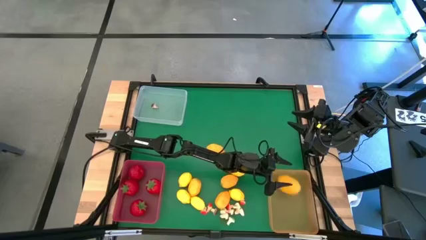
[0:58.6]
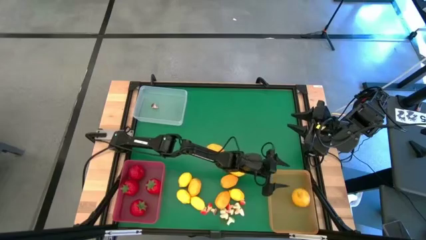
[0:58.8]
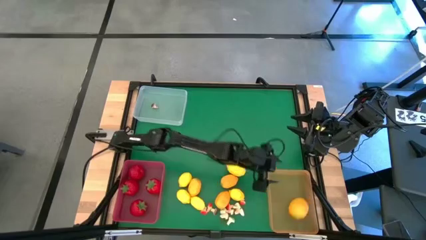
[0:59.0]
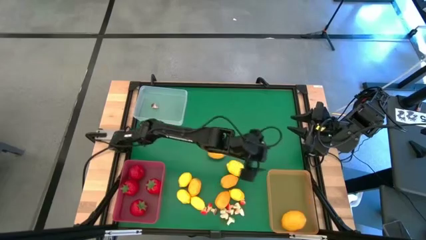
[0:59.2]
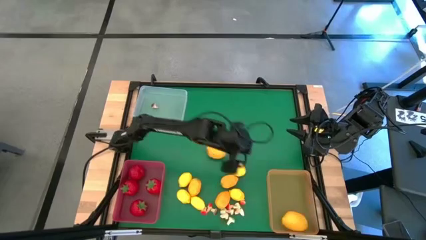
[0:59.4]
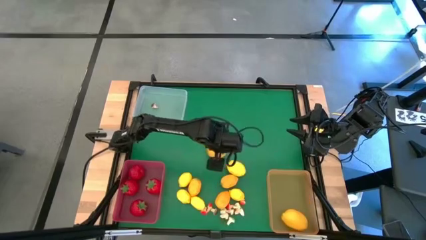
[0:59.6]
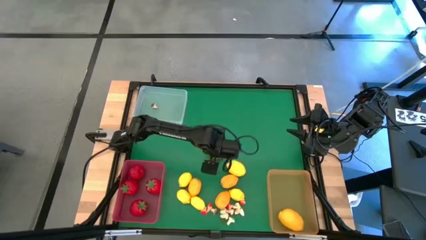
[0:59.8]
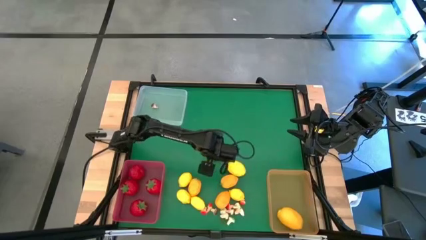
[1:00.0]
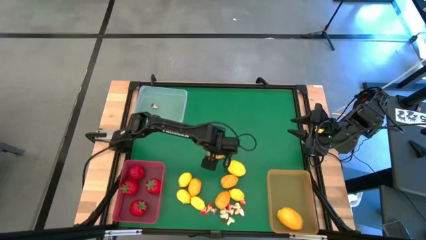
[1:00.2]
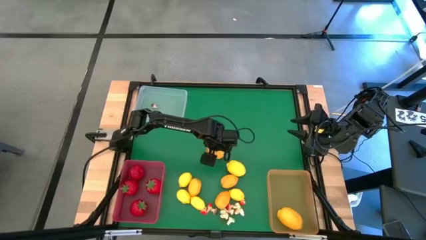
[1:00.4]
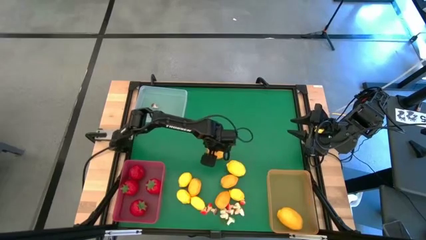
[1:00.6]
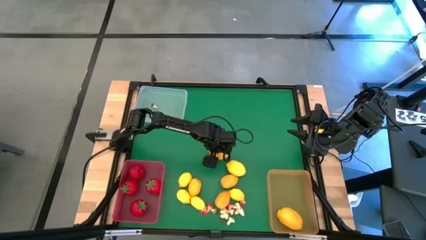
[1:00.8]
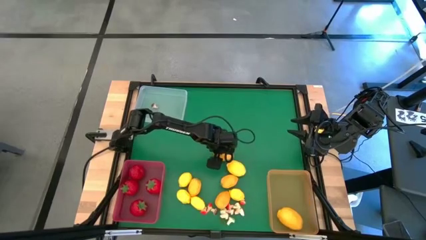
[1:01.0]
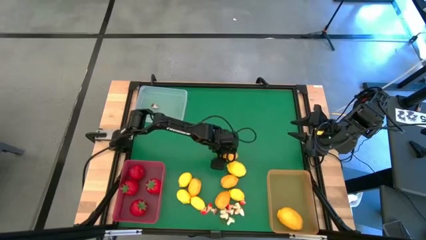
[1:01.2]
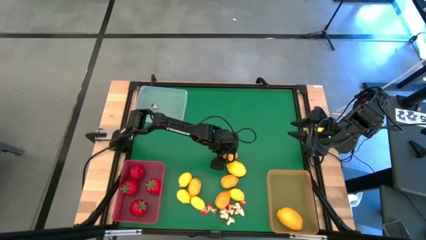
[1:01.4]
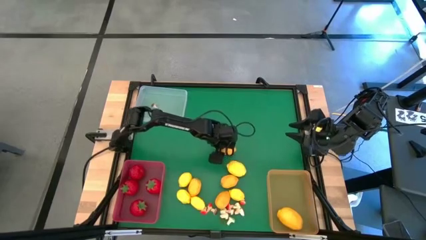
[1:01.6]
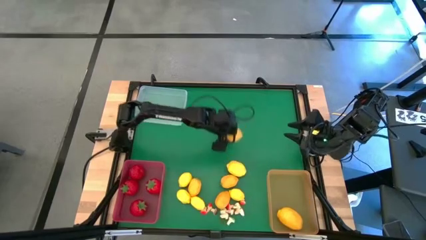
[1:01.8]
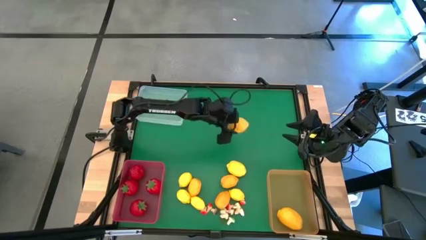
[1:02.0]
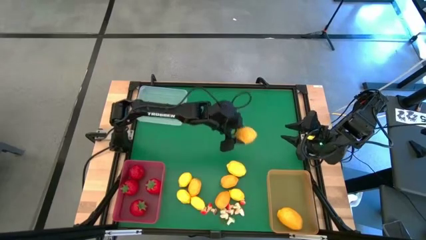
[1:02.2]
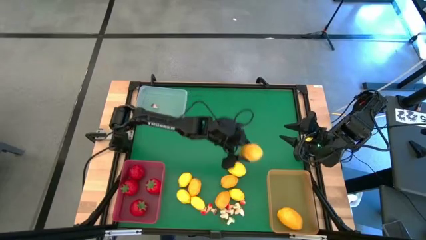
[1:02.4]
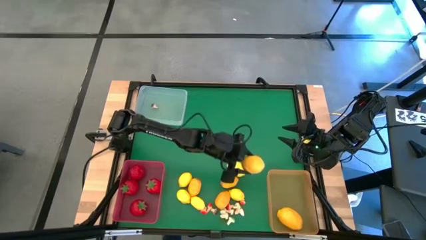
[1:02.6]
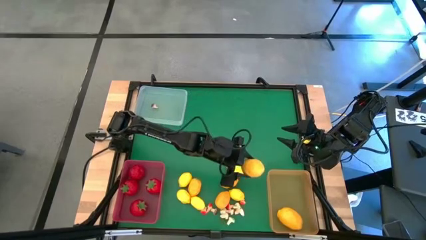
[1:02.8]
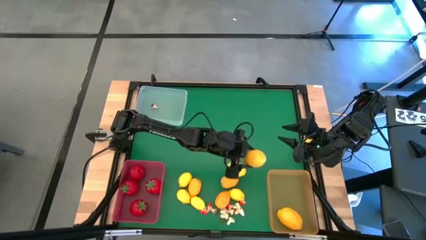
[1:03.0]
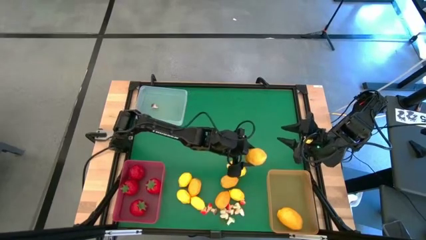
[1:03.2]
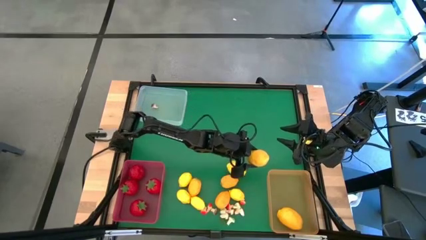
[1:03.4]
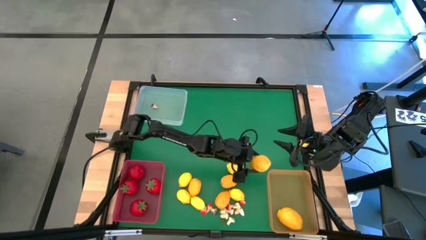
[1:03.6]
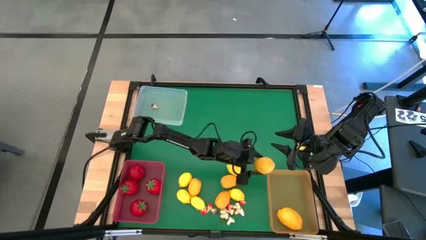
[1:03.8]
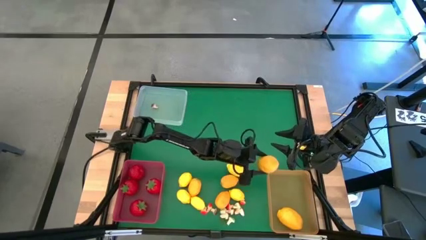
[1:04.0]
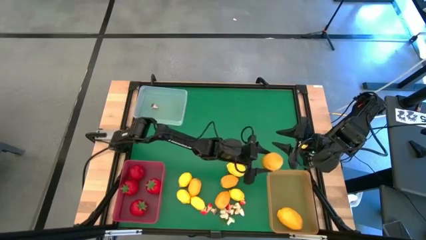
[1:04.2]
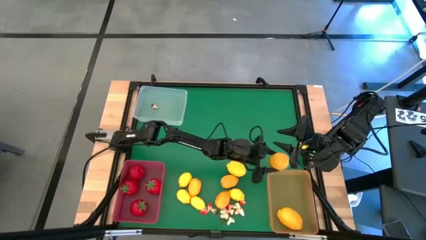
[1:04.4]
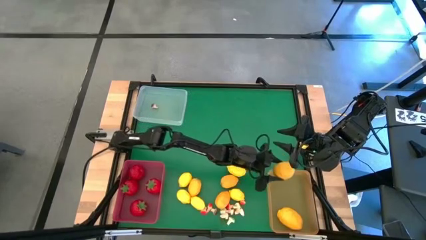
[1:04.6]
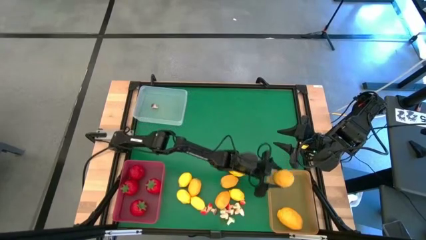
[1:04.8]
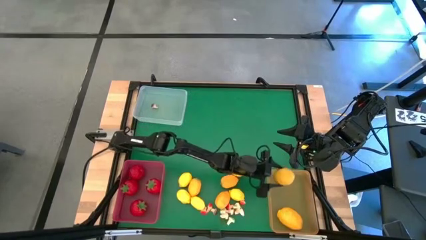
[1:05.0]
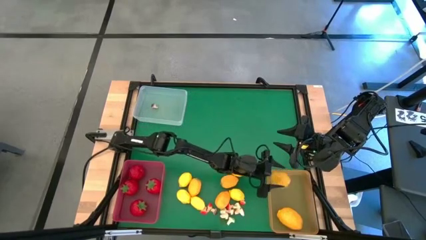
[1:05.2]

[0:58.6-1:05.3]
Task: Sort produce into baskets
Put the yellow lemon into the orange bin

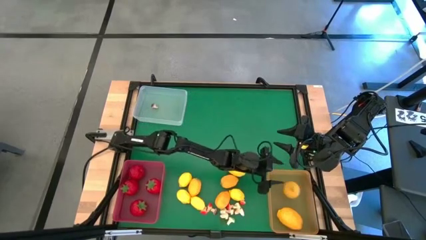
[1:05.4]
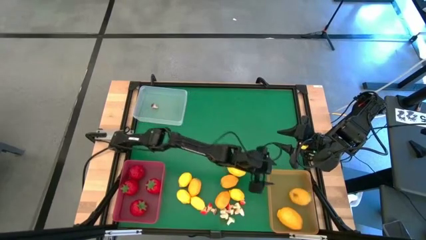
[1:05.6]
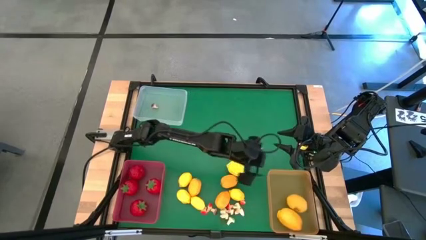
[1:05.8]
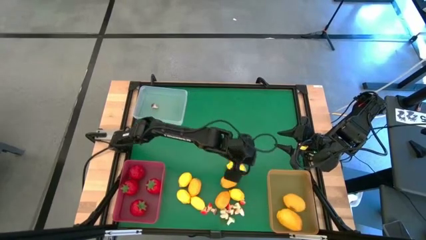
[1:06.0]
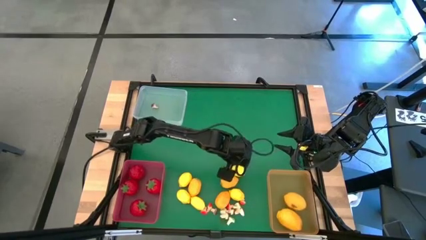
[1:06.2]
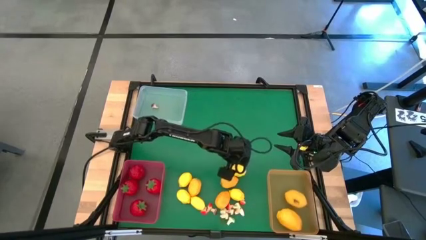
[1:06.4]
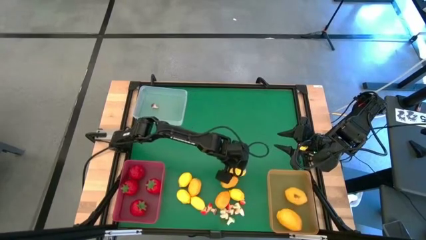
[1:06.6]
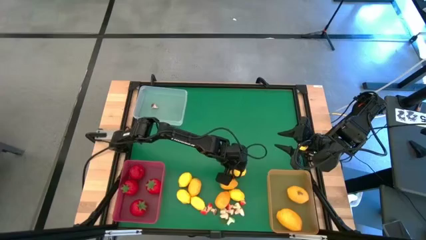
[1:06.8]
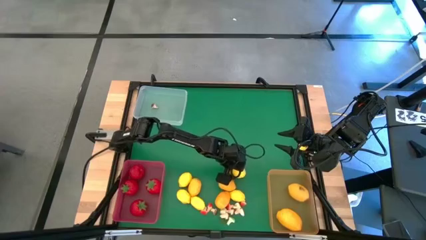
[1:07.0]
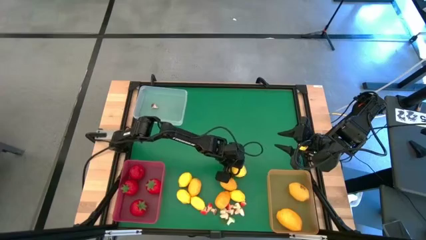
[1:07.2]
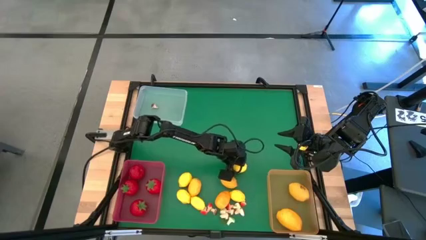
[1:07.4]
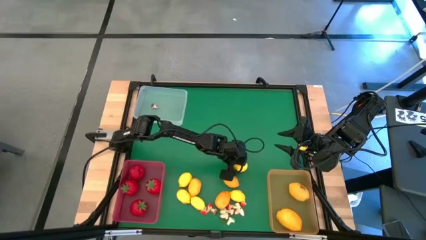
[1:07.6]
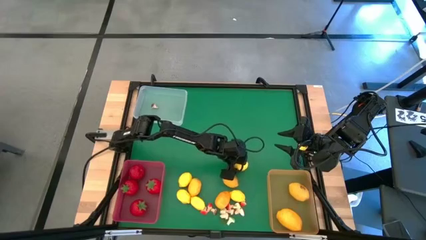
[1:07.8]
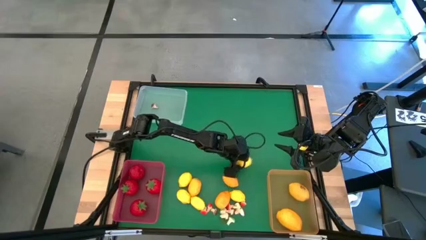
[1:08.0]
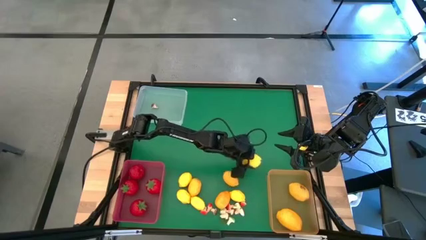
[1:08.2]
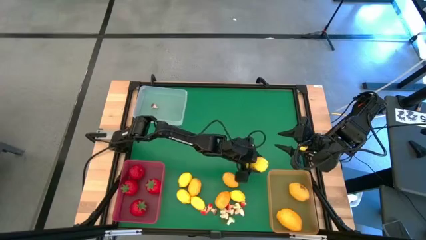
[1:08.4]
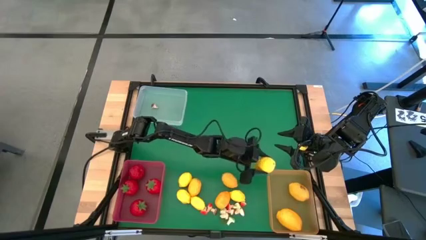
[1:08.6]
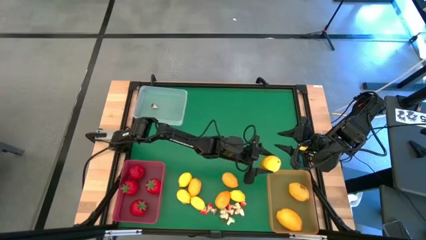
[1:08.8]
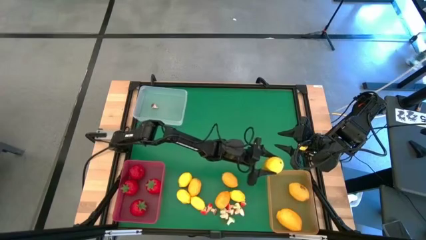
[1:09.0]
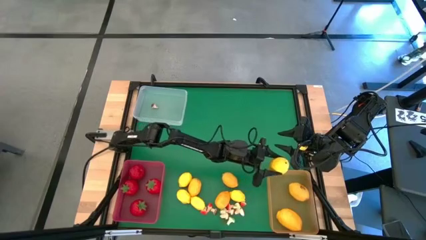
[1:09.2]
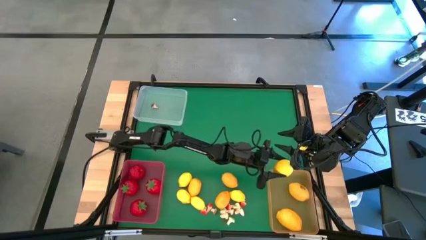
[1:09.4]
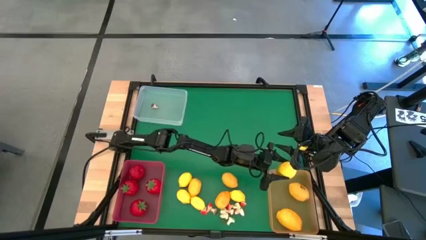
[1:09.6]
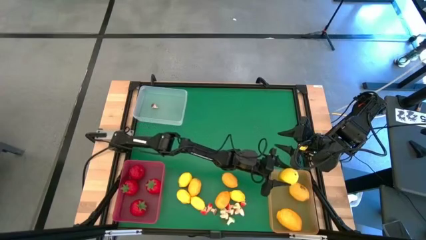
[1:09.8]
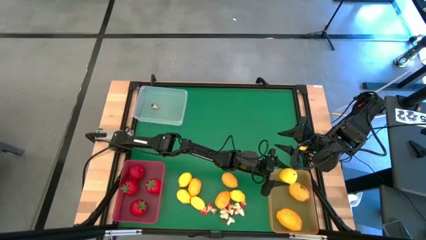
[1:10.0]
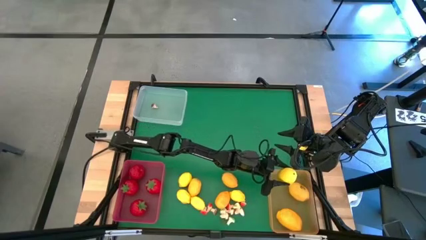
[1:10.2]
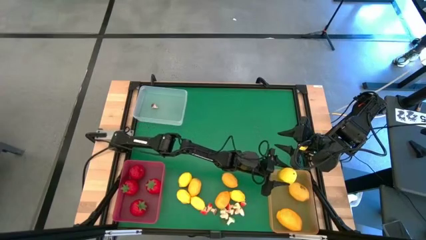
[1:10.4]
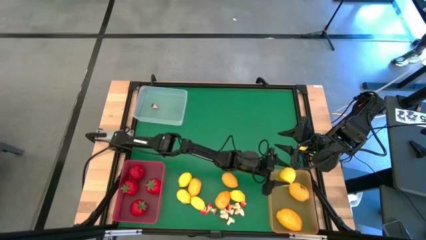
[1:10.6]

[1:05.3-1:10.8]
Put the yellow lemon into the orange bin
